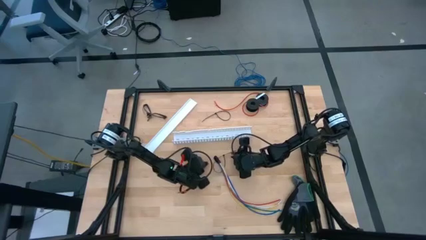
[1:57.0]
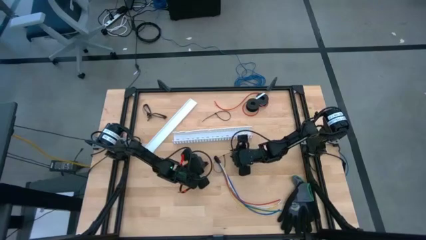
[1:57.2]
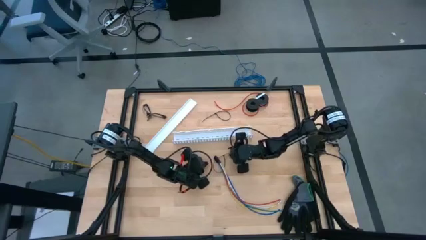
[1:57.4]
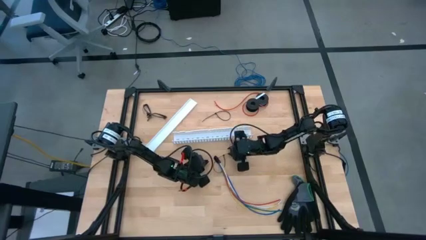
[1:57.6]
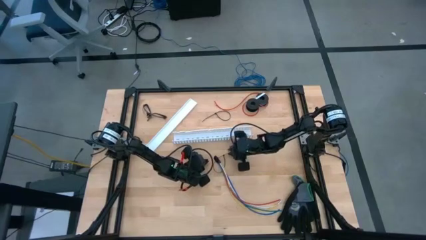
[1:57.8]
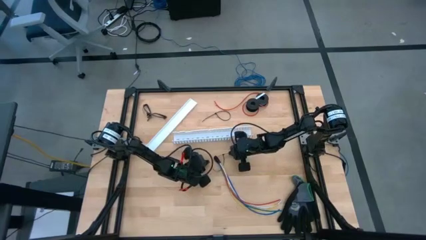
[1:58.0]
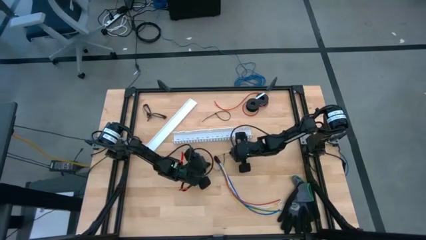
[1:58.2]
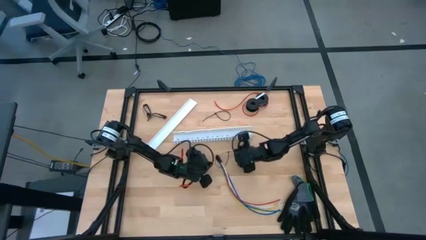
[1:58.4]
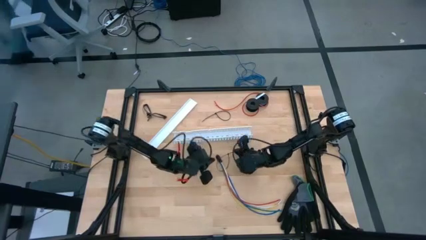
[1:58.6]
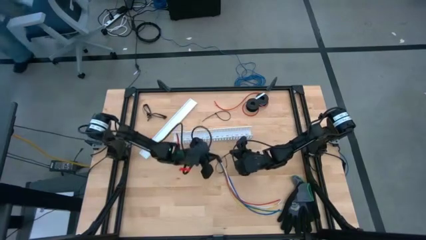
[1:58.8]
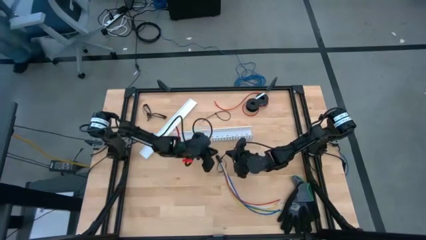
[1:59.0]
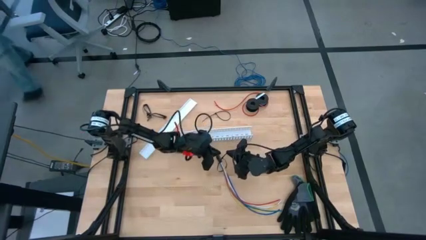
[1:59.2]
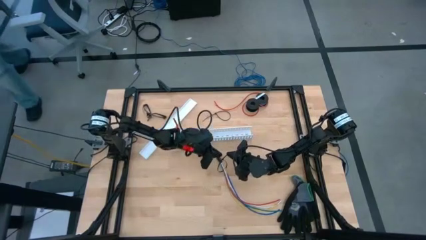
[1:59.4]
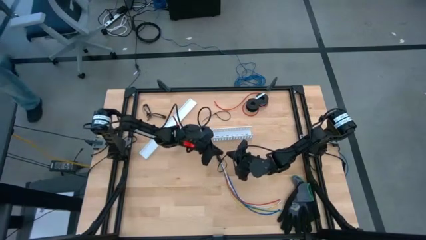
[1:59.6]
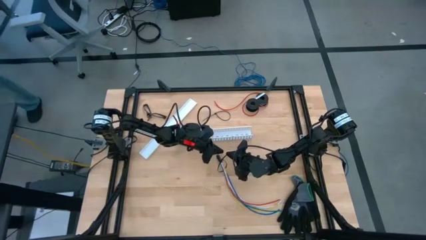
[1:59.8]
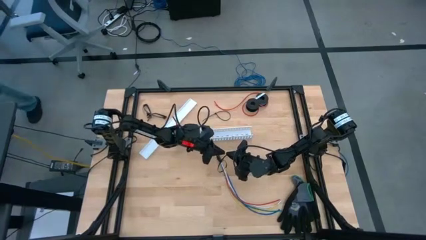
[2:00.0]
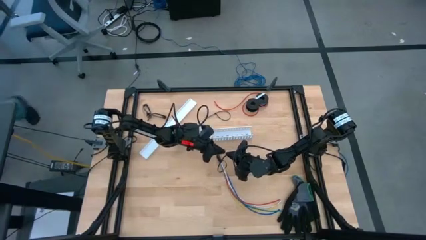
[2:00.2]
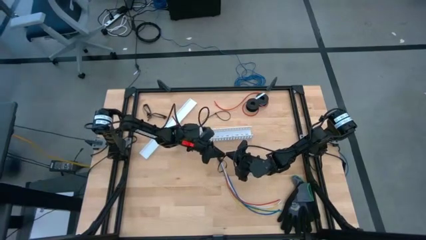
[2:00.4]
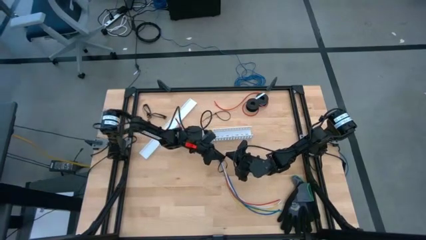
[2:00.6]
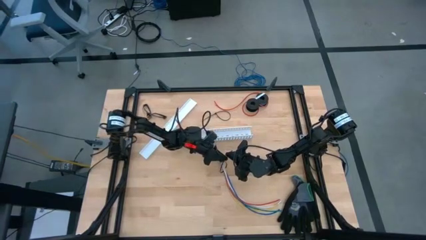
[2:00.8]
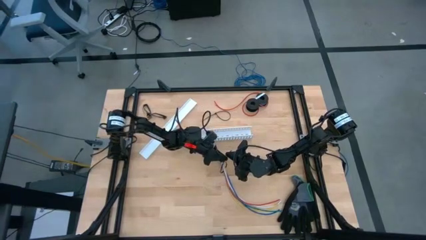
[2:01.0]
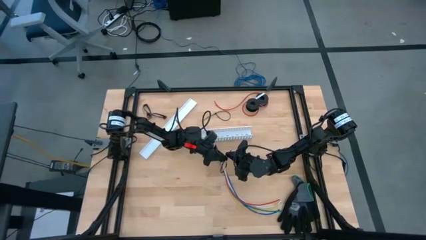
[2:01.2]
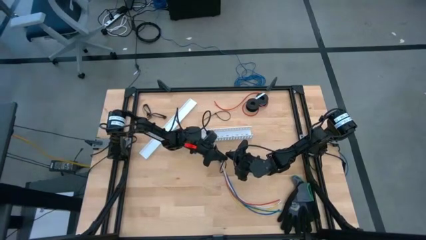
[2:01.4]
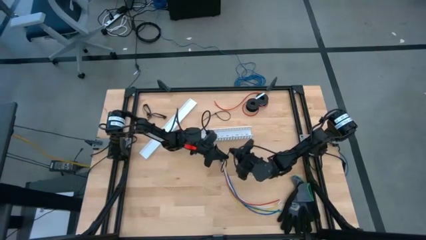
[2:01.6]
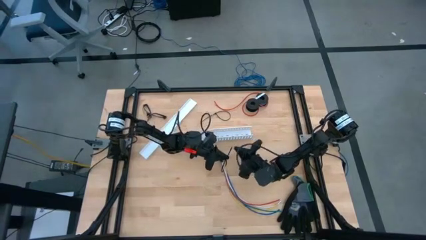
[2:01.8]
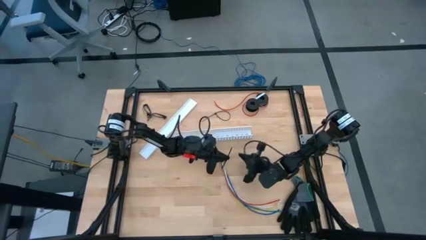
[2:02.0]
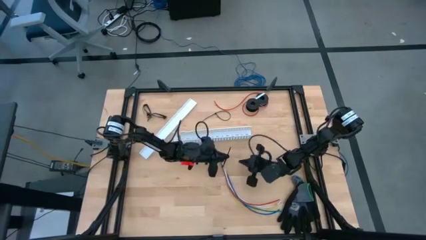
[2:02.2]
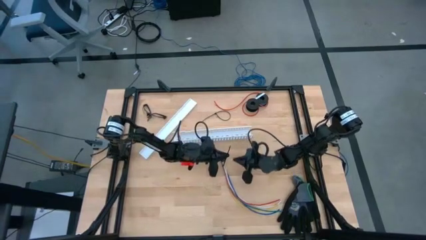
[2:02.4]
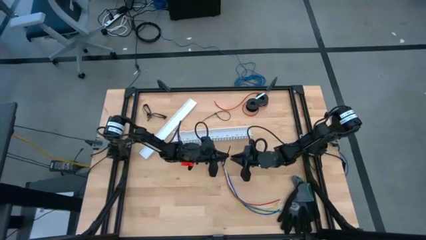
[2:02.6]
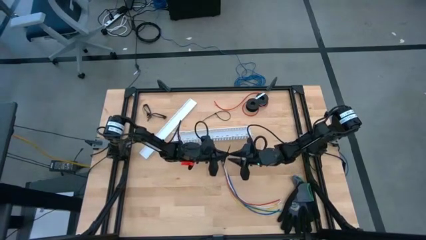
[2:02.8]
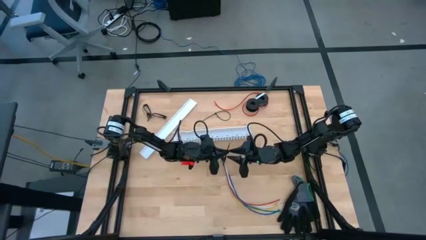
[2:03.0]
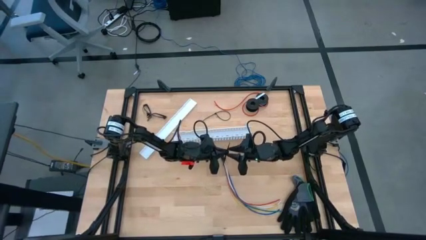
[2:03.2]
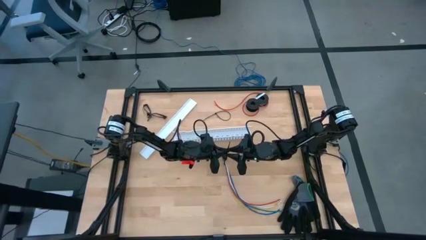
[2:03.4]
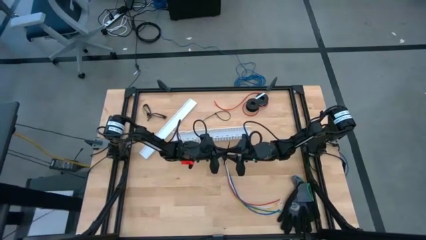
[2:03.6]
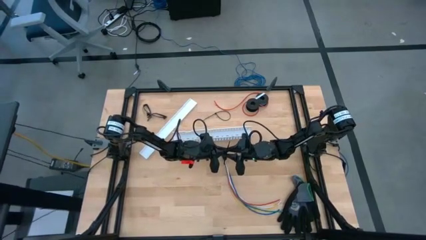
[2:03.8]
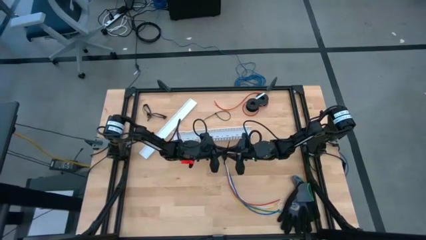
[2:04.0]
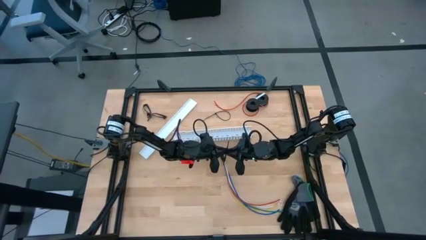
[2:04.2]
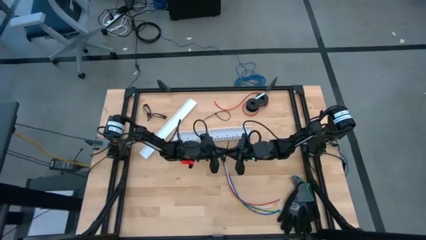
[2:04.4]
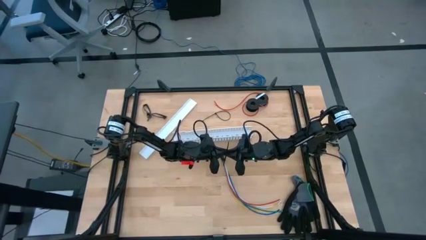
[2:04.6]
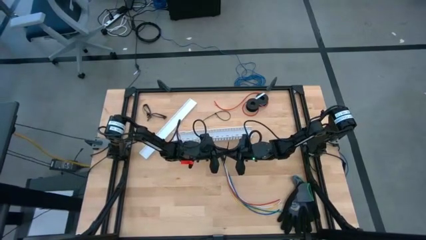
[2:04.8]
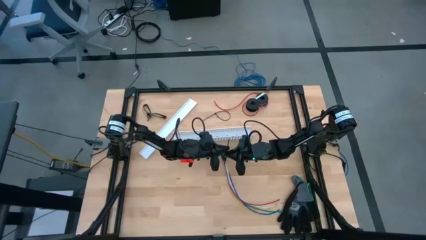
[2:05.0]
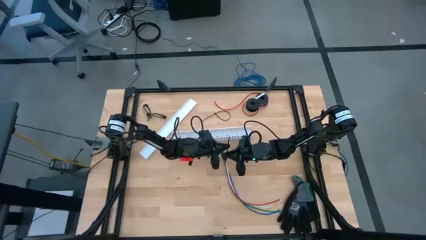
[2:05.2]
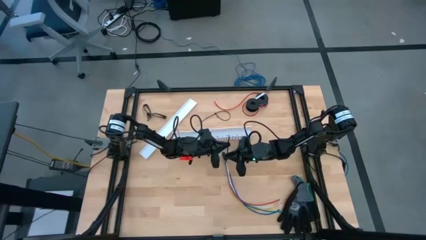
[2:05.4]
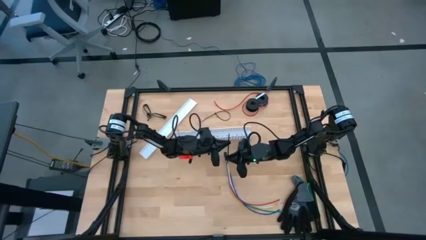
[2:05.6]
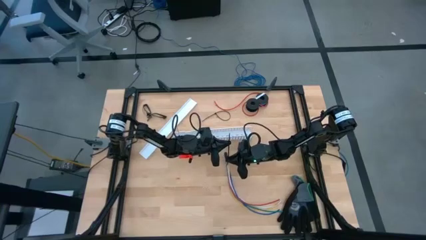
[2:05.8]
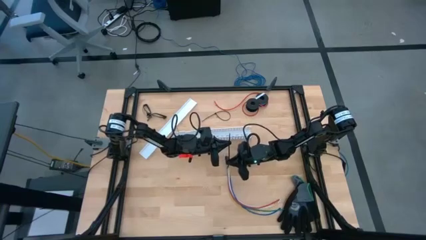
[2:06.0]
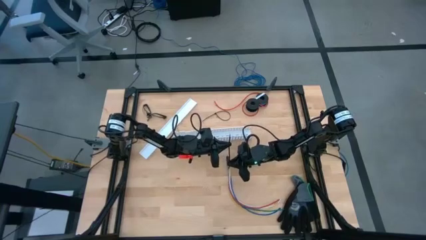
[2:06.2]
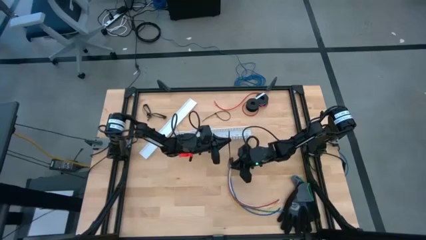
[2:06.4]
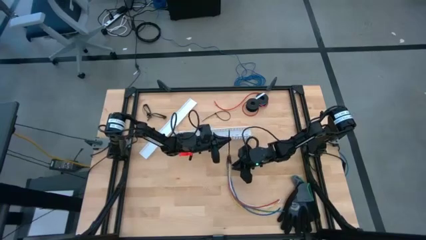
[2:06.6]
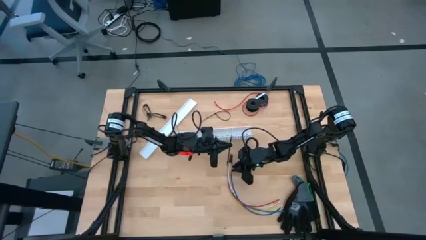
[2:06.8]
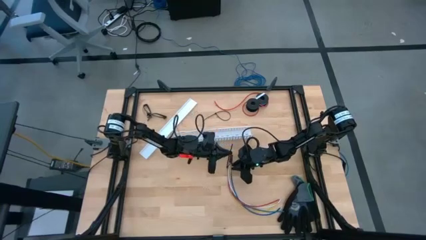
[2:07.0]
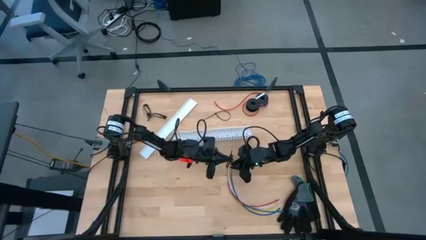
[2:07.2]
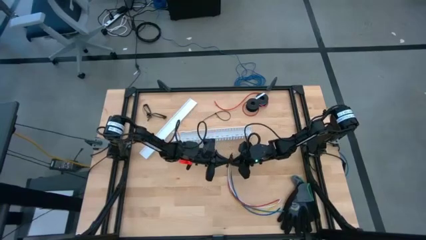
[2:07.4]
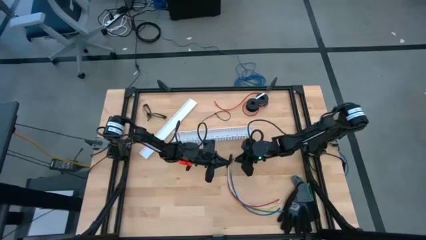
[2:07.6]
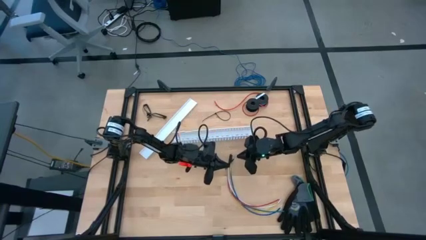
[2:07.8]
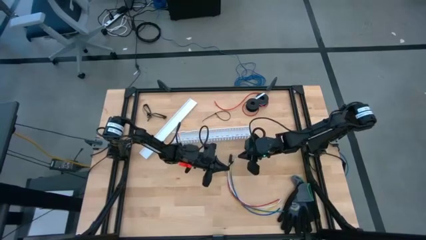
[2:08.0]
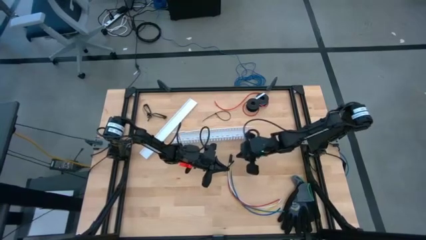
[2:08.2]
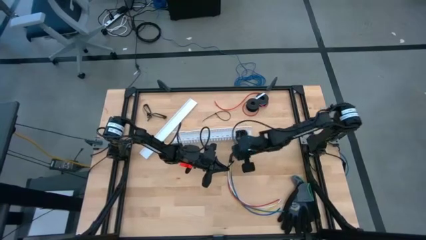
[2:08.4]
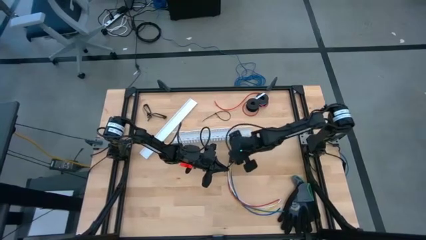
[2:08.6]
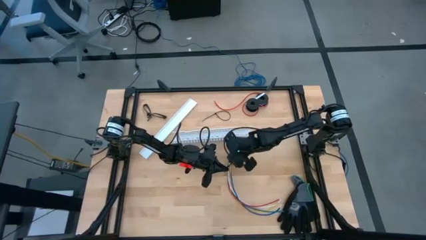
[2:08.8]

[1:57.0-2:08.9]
Task: Ziptie cables
Wrap the cables together using the left black zip tie

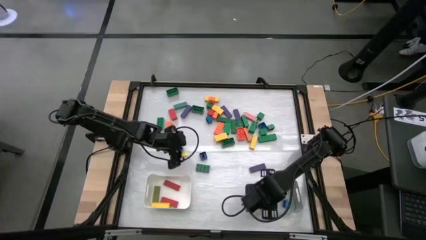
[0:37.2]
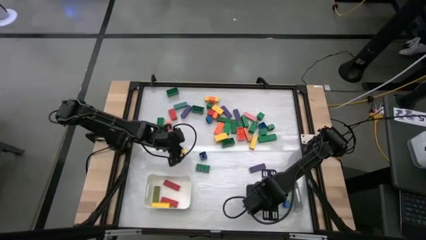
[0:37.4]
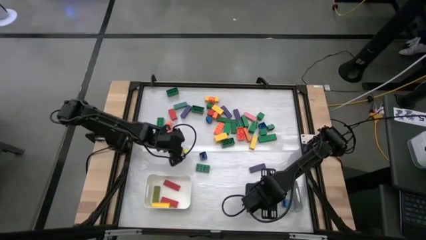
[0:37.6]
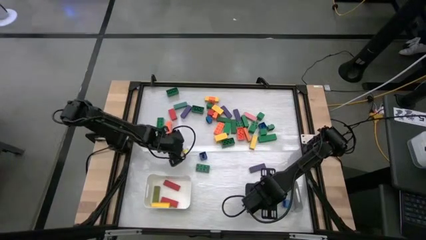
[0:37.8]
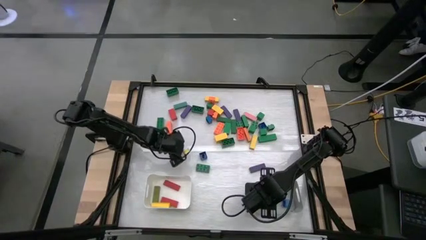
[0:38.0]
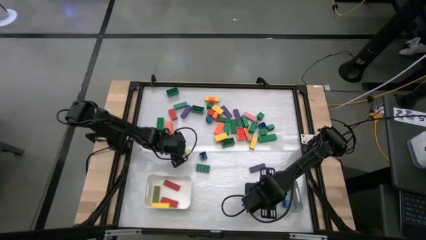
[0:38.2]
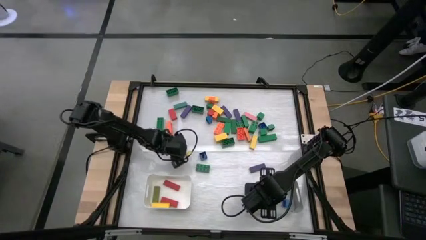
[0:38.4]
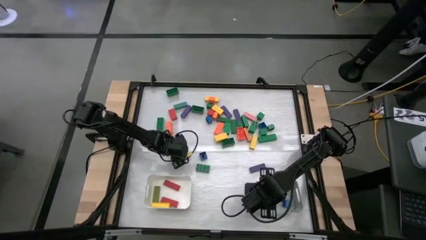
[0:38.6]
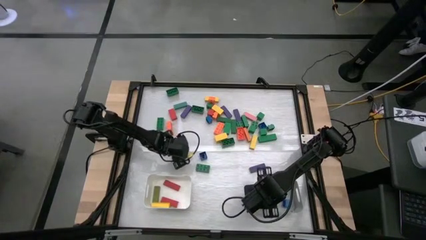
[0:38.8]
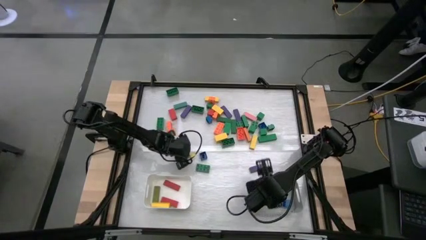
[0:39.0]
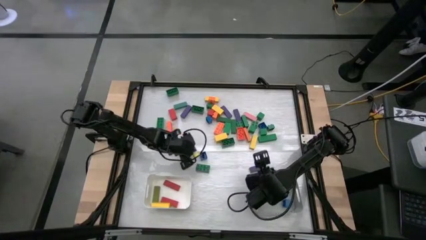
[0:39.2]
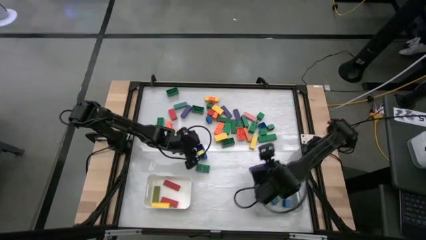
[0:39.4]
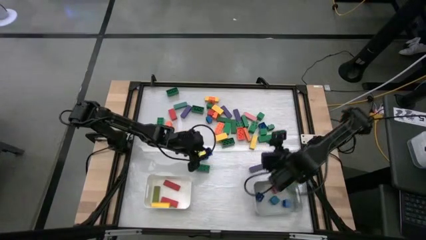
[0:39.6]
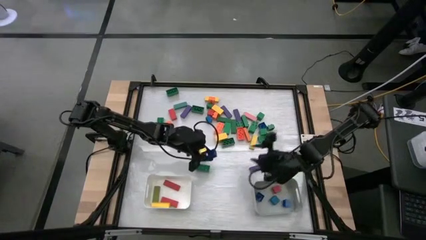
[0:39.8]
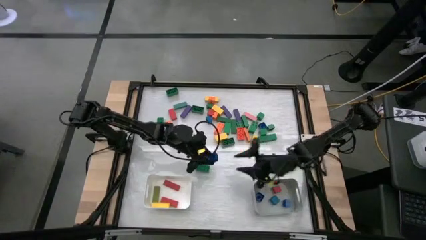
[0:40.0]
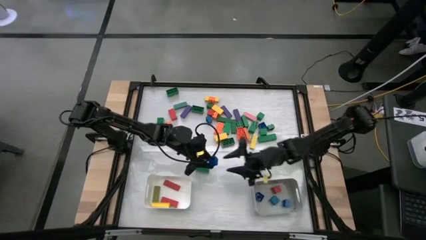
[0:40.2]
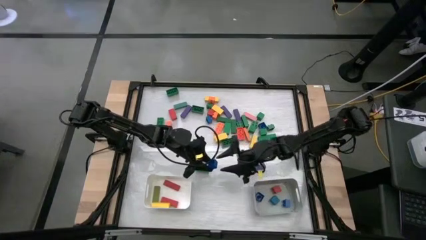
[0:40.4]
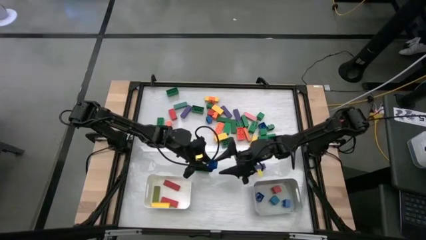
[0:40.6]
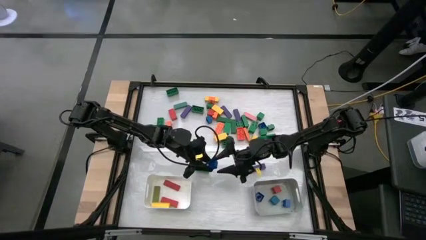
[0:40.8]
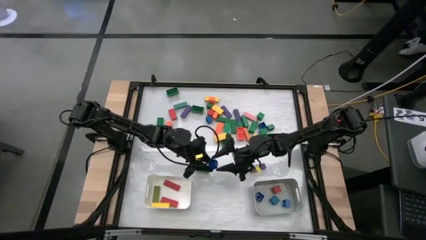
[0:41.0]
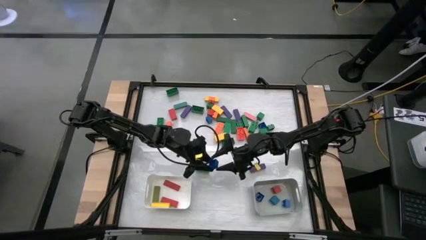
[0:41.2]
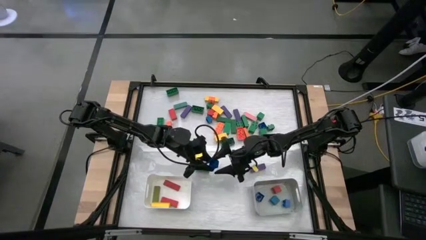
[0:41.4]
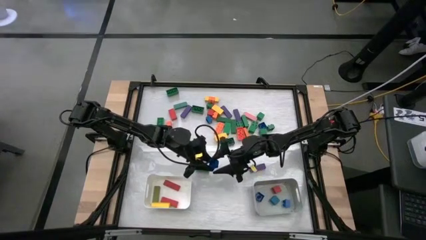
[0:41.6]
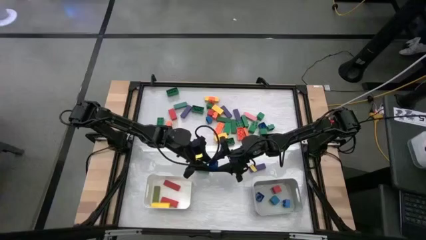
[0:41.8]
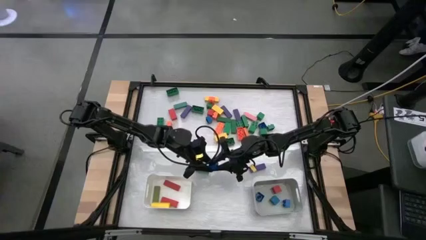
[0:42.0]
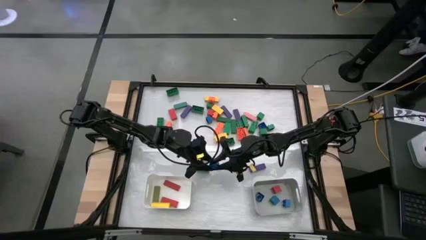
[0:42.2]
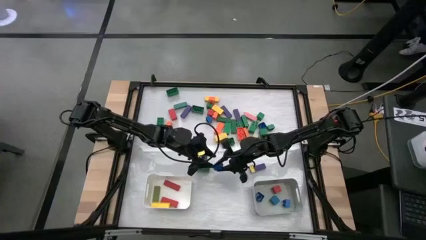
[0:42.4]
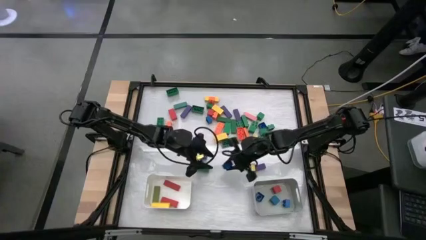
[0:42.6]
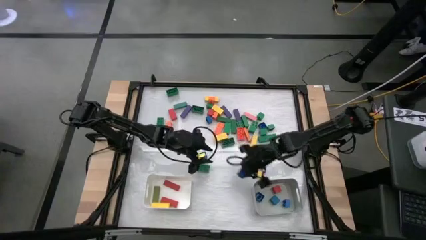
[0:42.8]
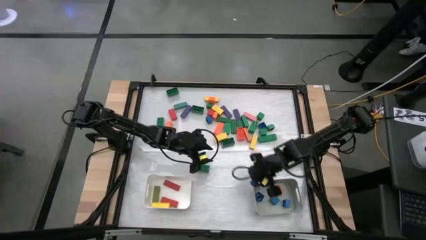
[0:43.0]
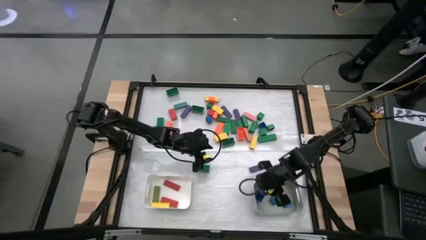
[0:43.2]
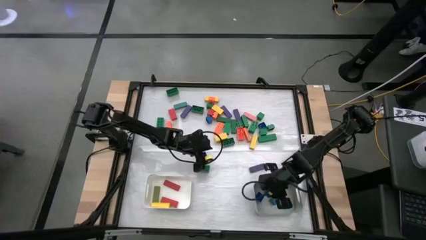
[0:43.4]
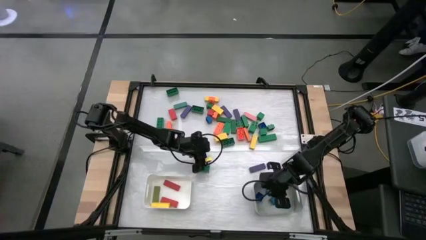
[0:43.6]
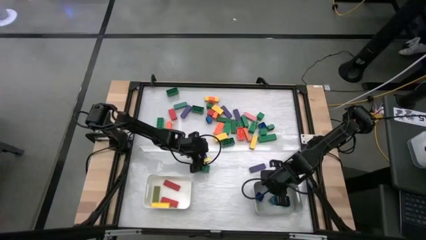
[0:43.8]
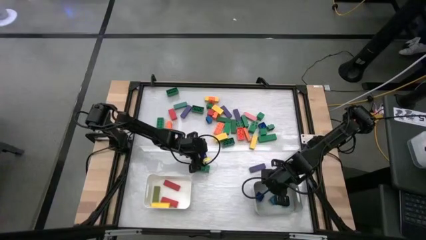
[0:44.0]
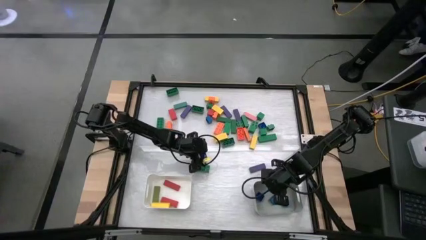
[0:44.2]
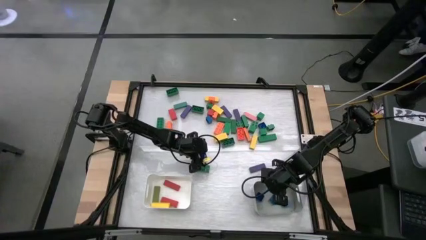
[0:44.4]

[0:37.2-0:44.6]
Task: Sort blocks by size
Put the square blue game piece into the gray bin
